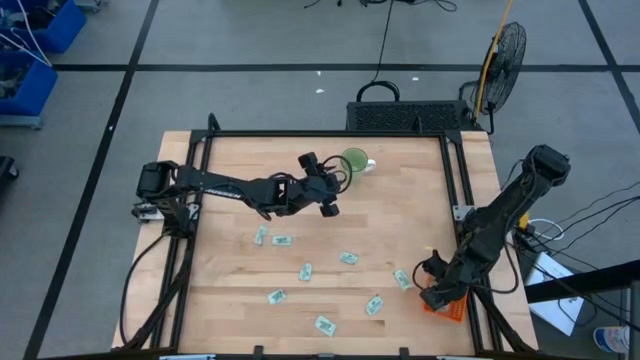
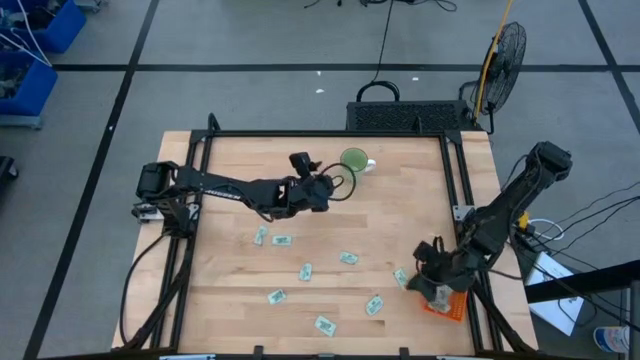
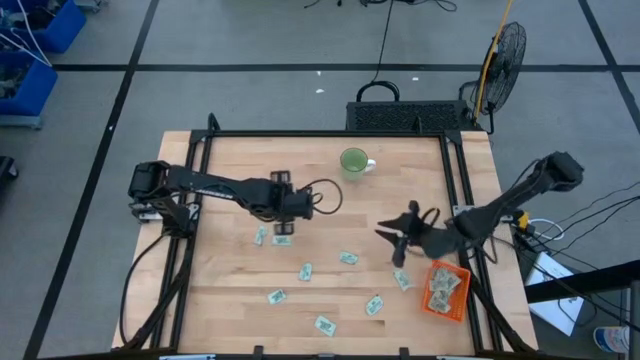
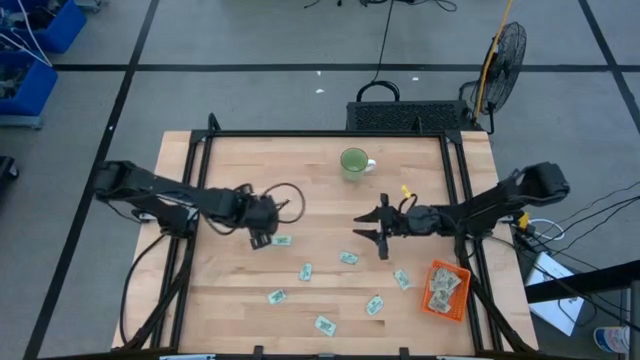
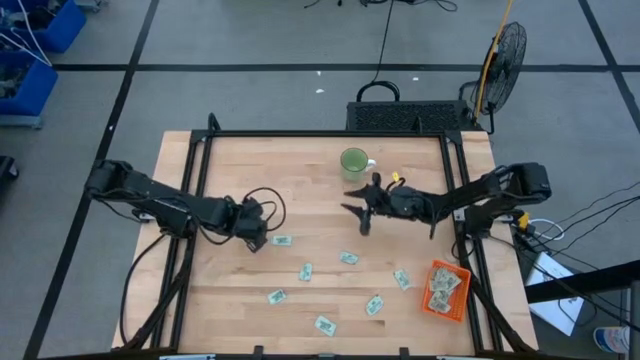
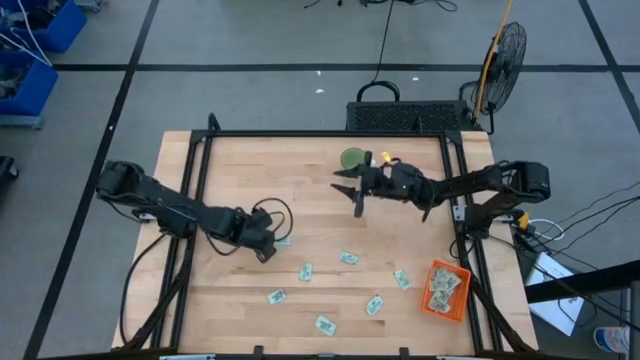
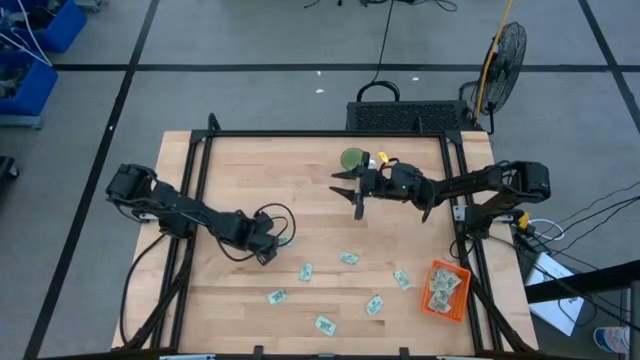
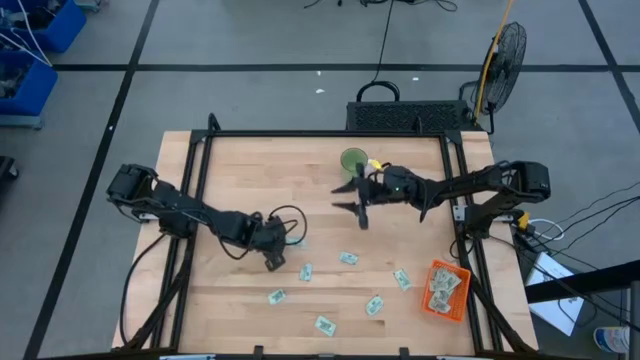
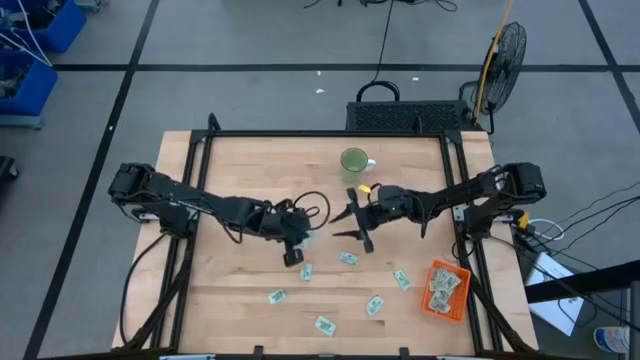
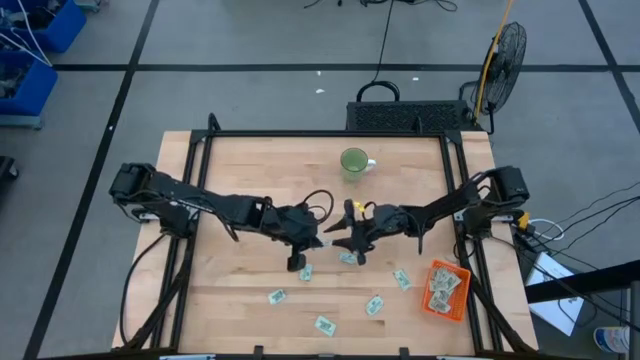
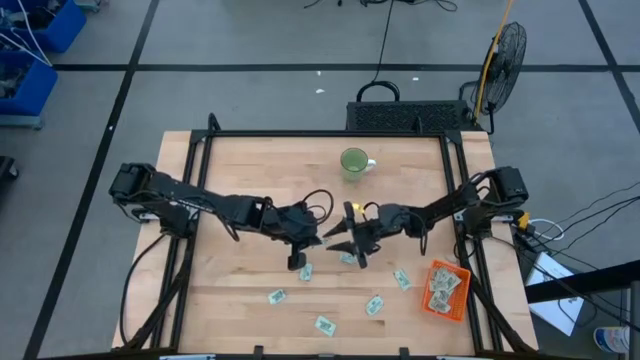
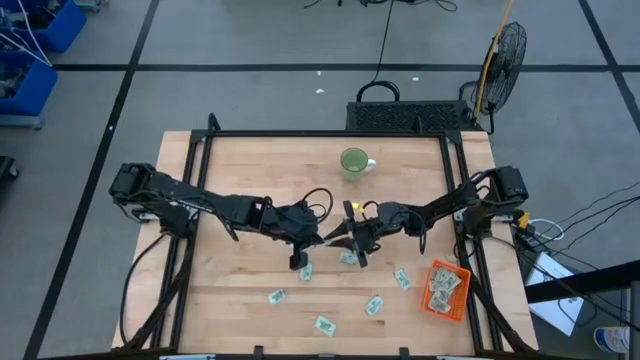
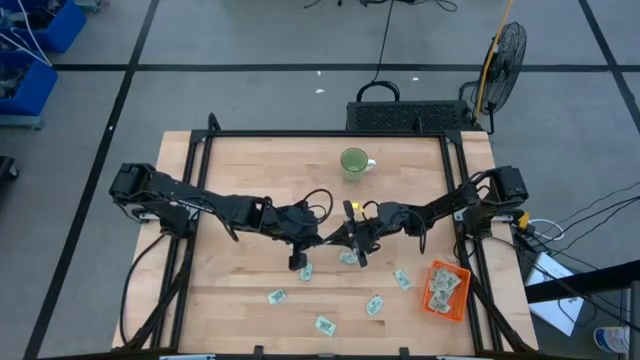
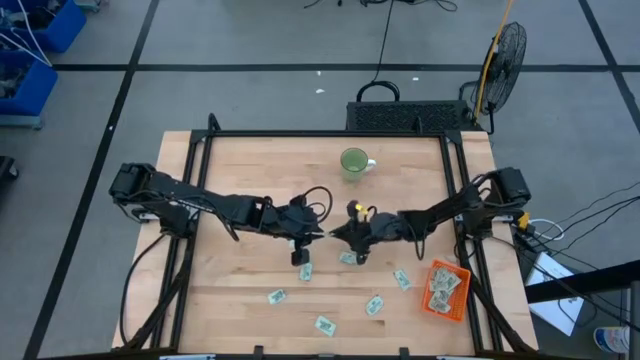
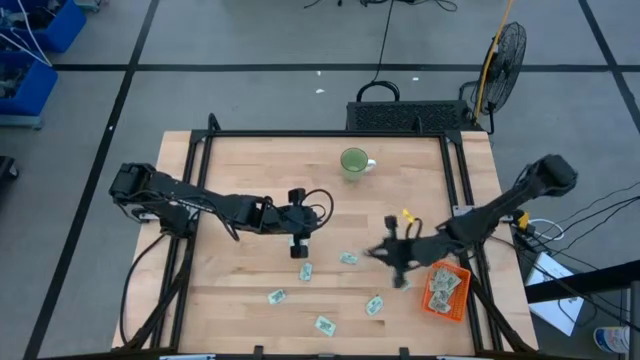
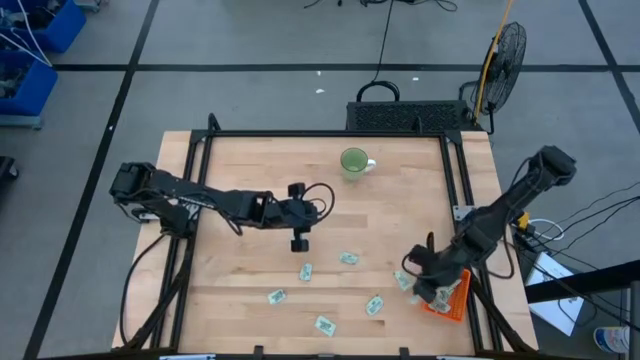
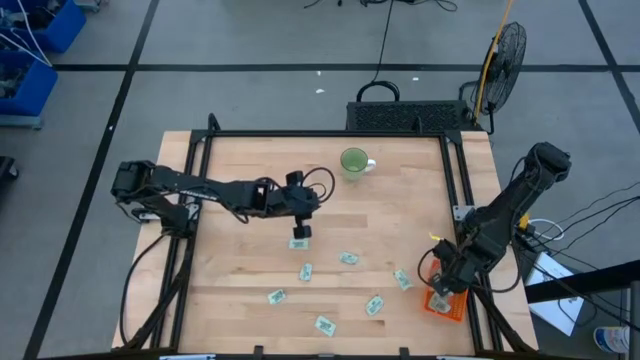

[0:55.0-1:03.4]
Task: Pick and place Stevia / Truvia into bins
Put the stevia packet into the orange bin

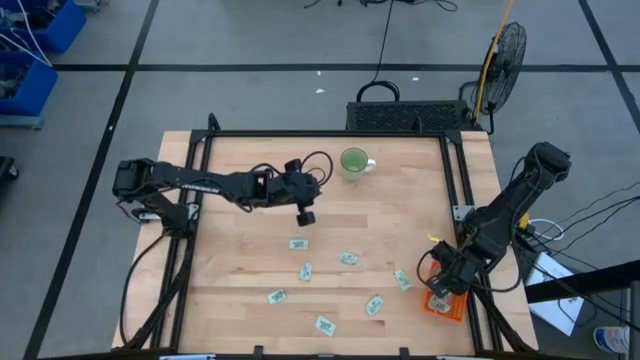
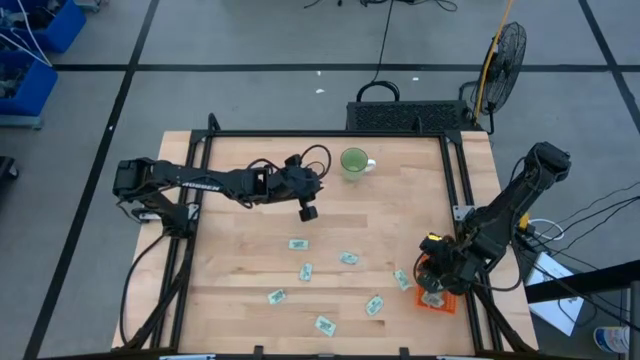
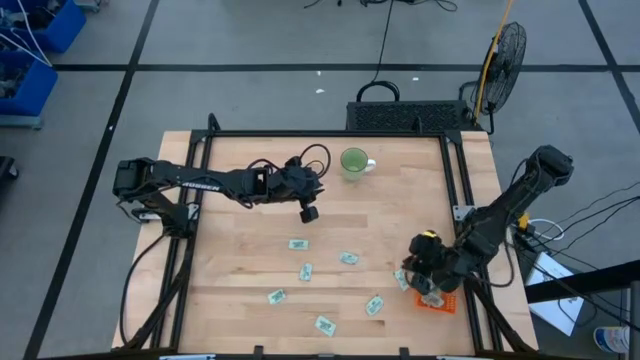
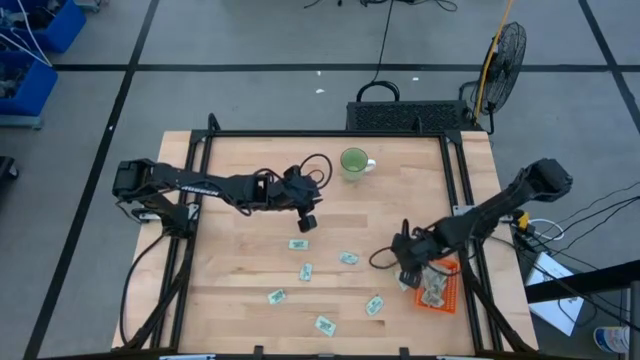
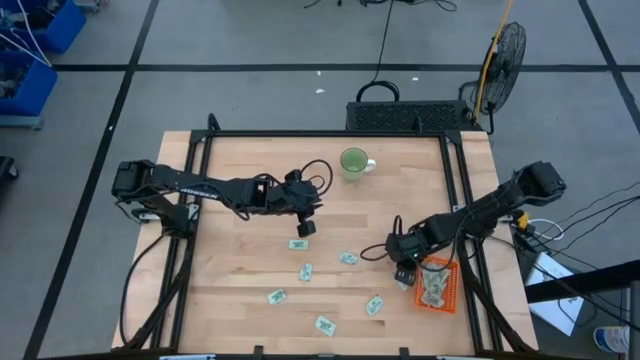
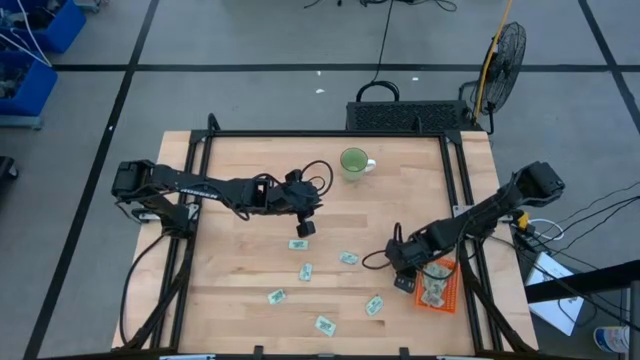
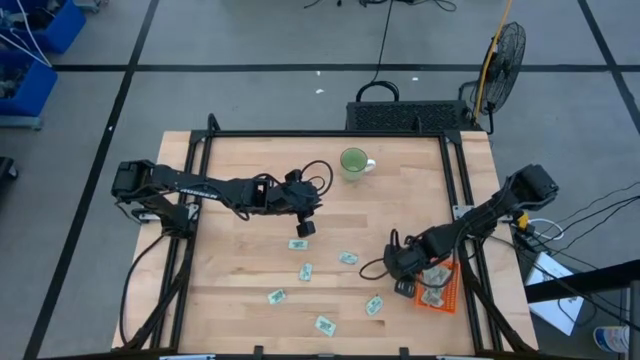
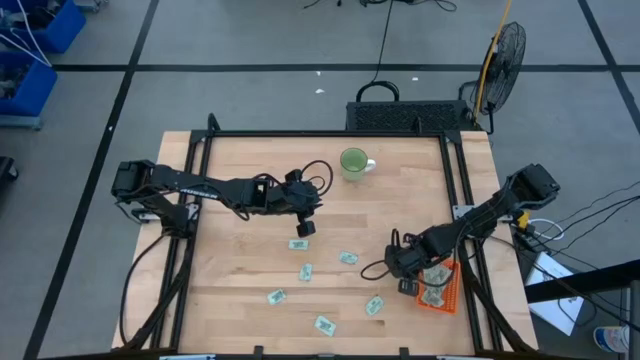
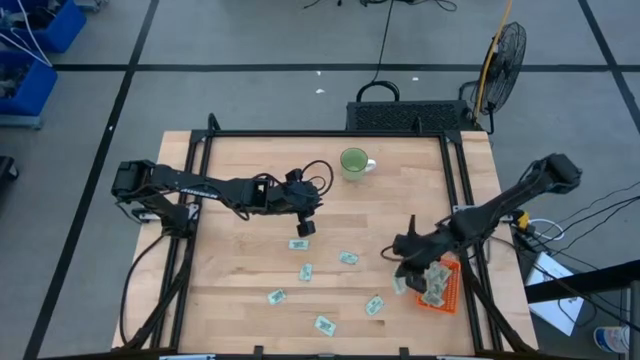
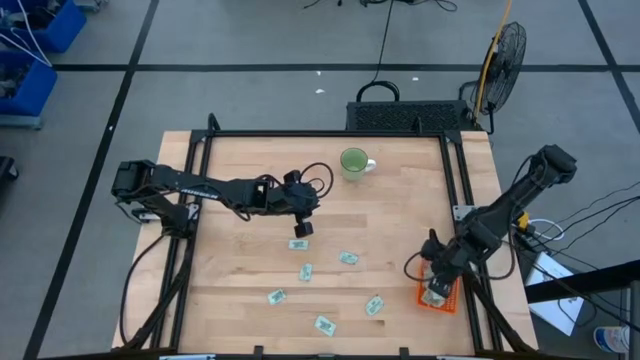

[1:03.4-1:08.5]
Put the stevia packet into the orange bin

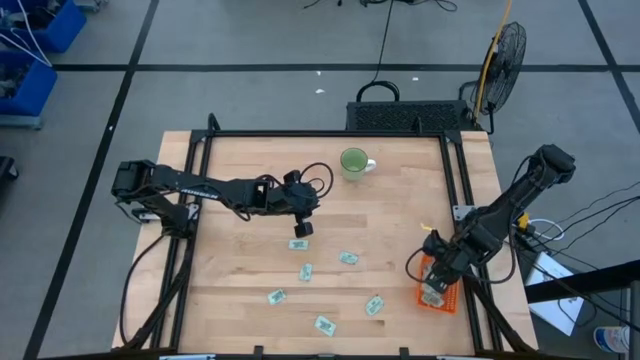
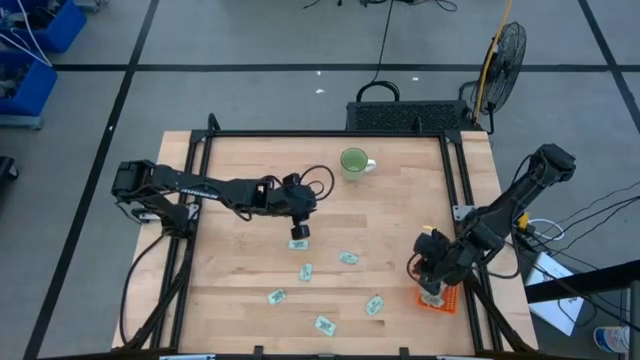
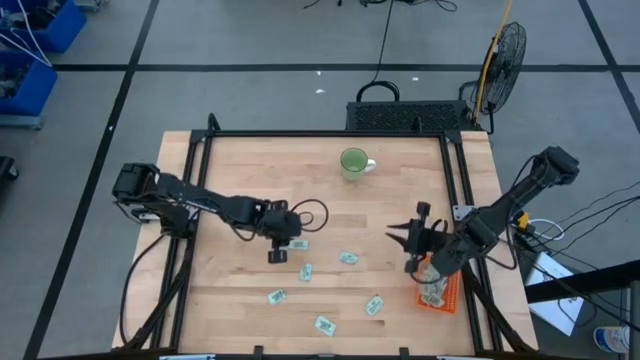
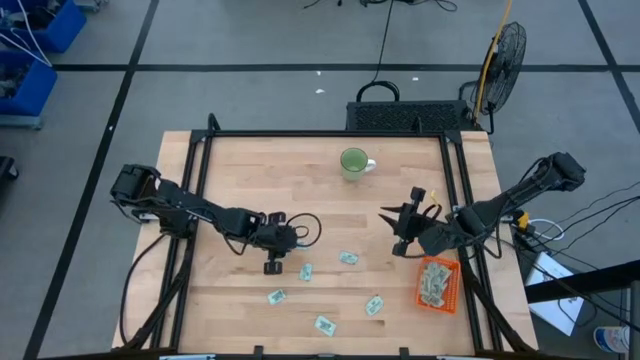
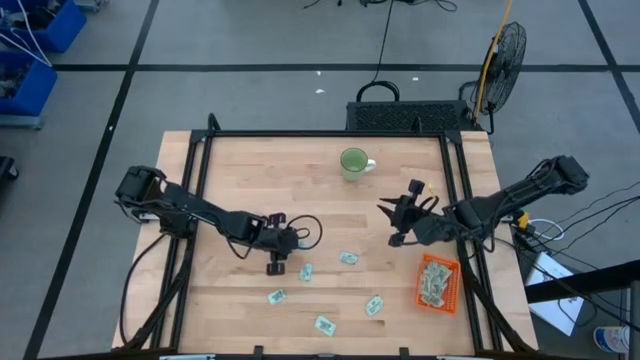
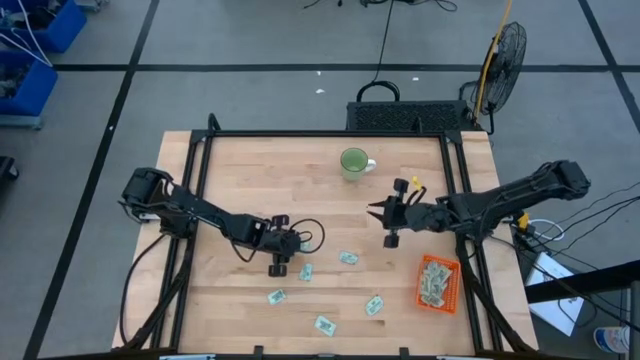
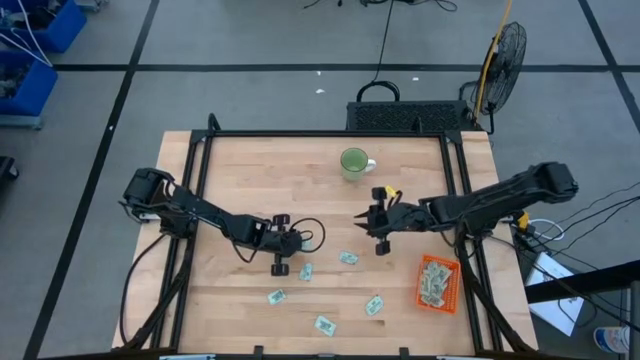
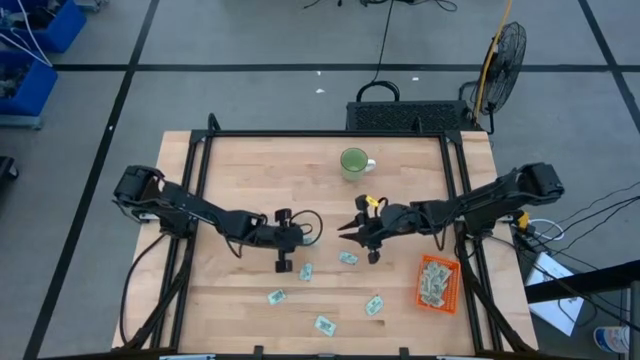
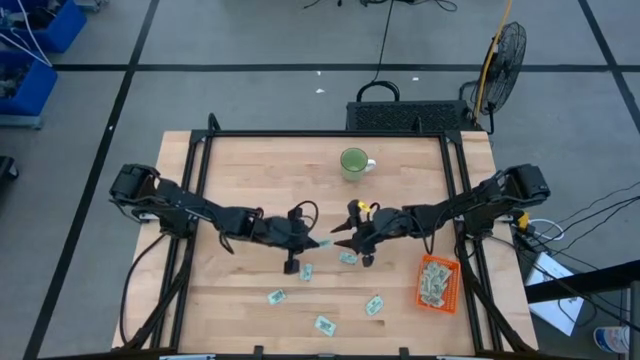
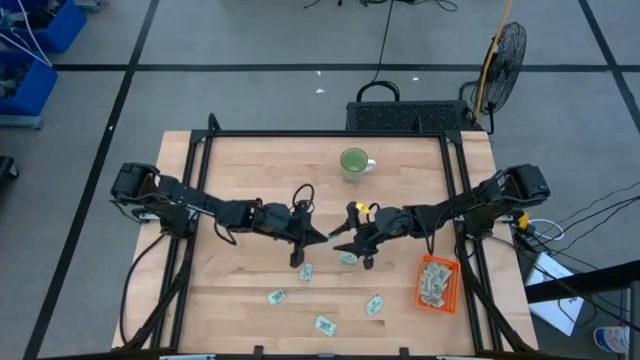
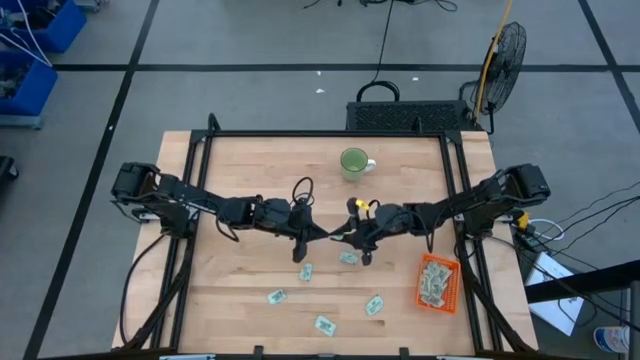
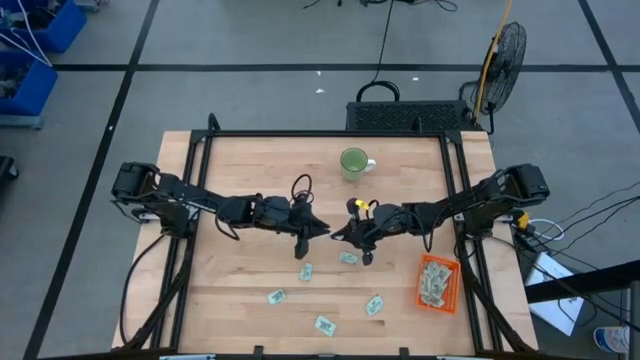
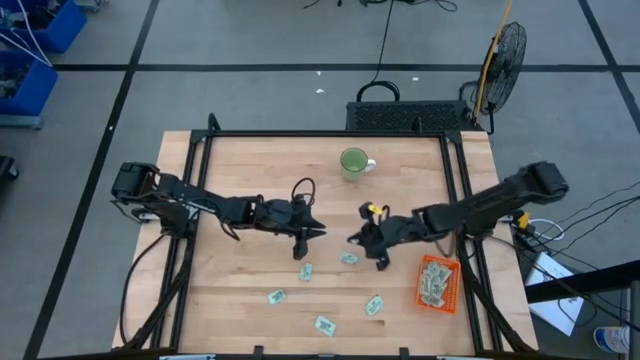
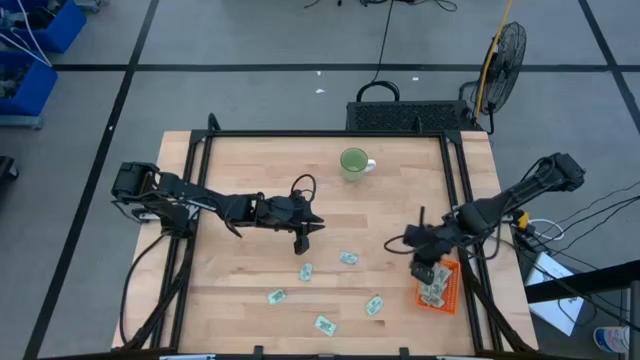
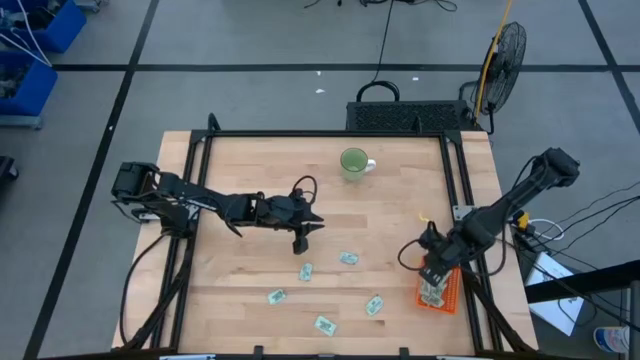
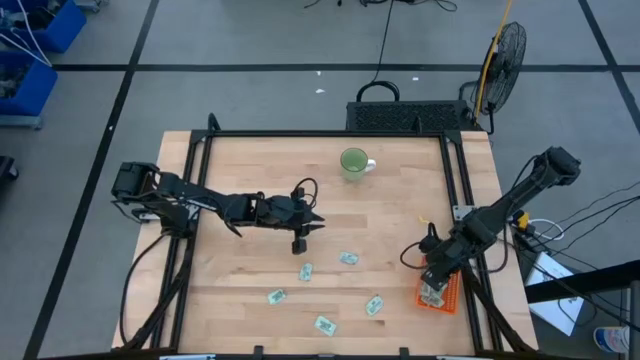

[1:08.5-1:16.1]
Put the stevia packet into the orange bin

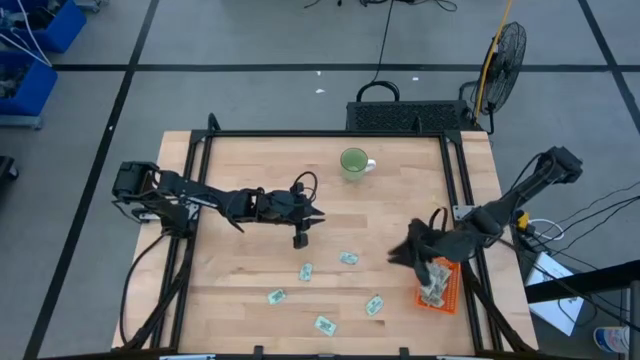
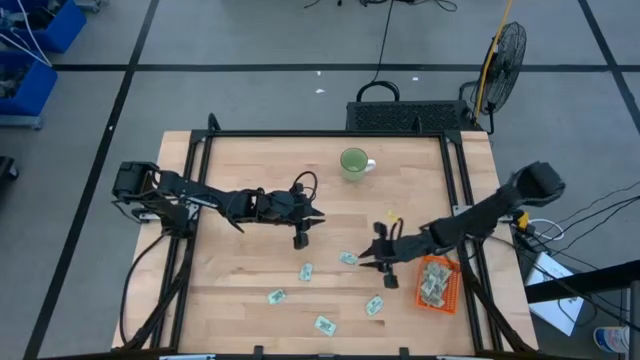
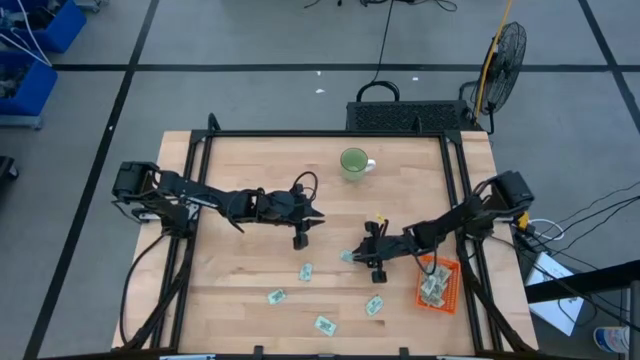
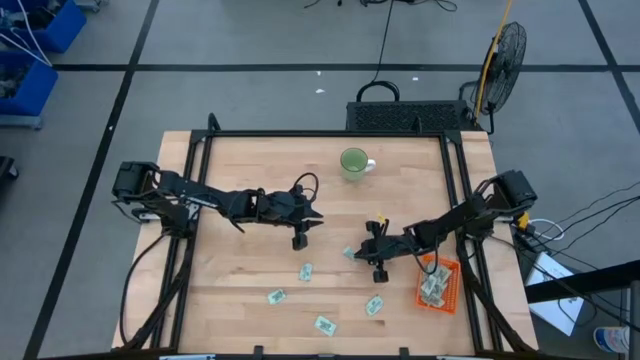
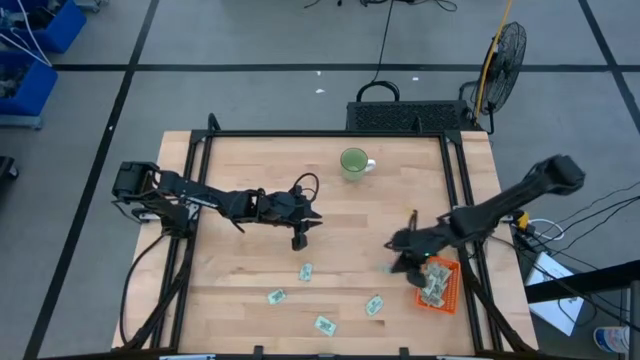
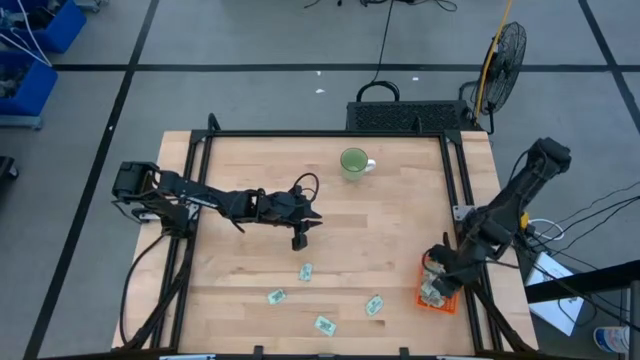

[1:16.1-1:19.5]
Put the stevia packet into the orange bin
